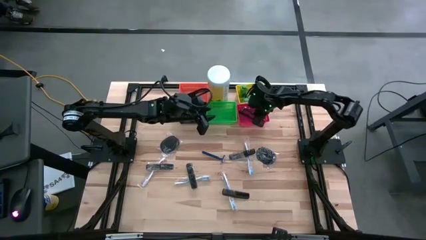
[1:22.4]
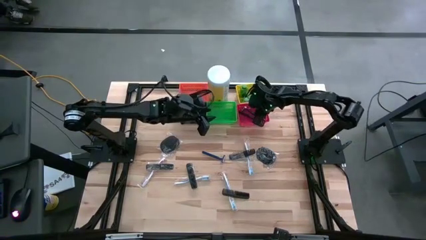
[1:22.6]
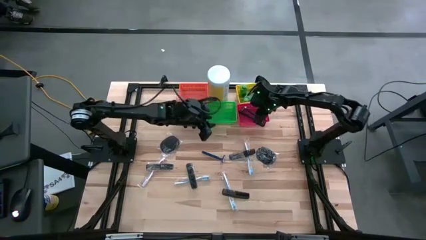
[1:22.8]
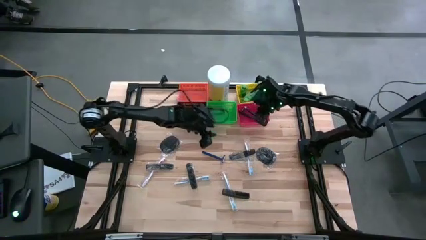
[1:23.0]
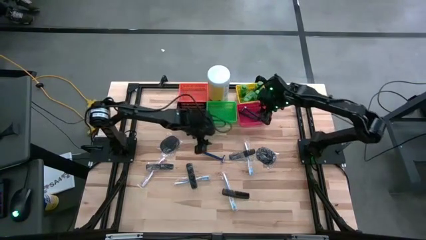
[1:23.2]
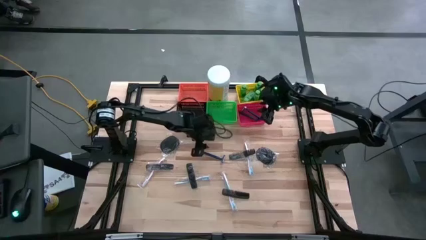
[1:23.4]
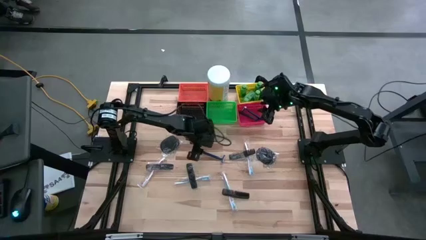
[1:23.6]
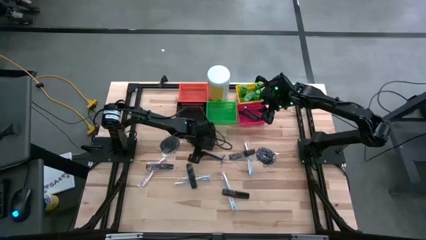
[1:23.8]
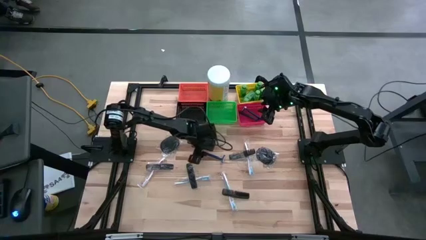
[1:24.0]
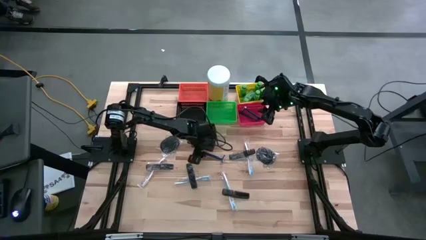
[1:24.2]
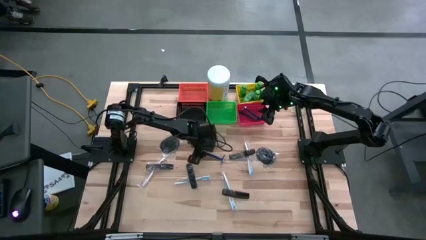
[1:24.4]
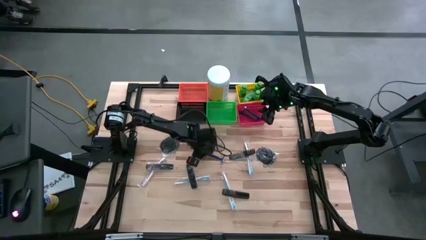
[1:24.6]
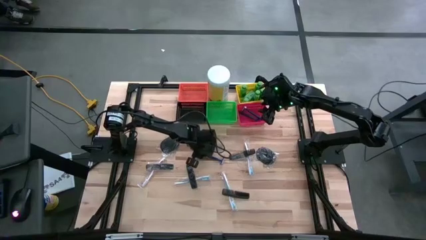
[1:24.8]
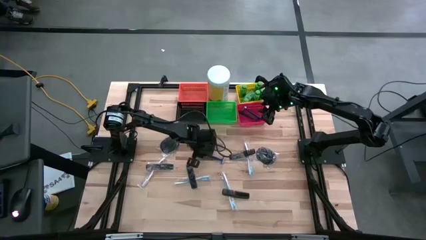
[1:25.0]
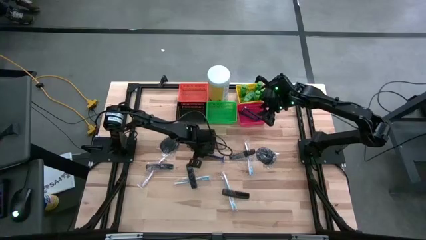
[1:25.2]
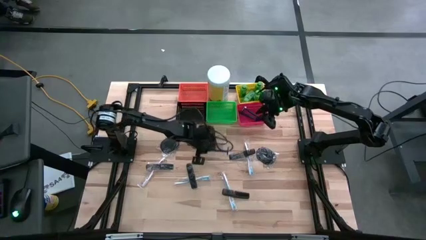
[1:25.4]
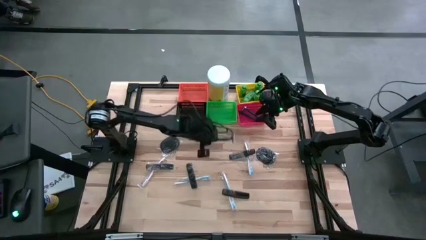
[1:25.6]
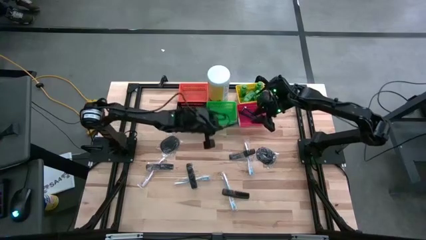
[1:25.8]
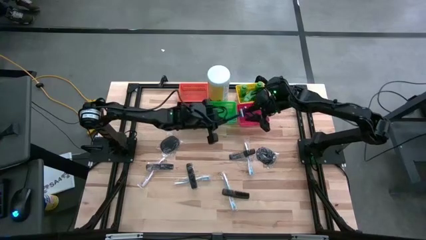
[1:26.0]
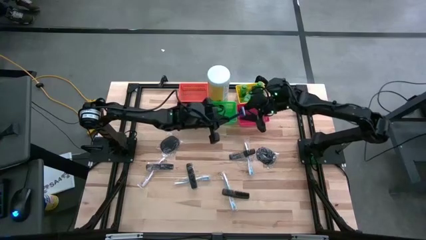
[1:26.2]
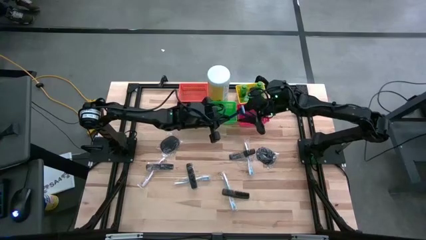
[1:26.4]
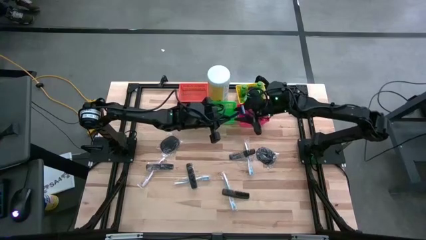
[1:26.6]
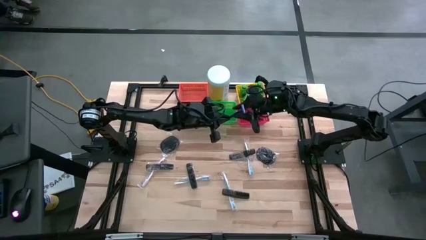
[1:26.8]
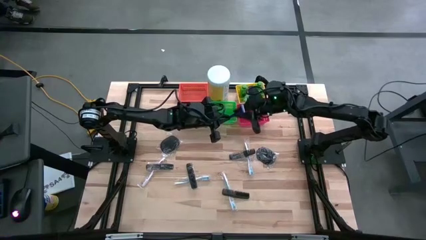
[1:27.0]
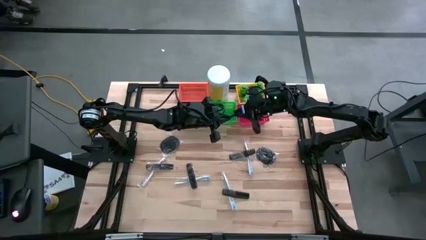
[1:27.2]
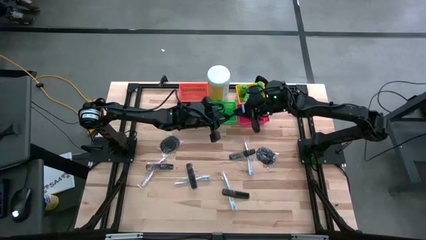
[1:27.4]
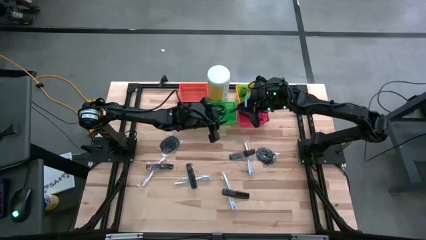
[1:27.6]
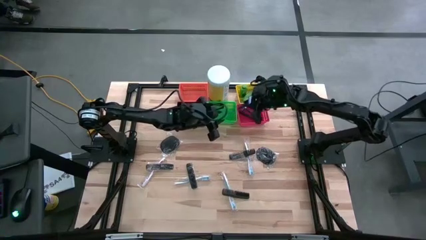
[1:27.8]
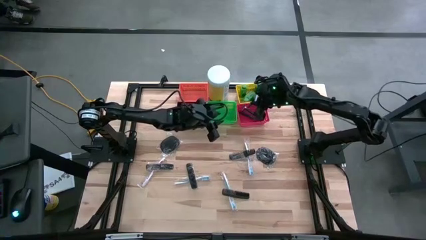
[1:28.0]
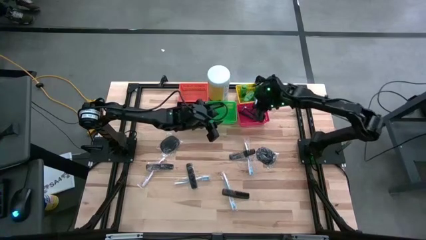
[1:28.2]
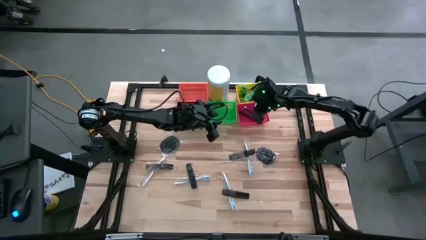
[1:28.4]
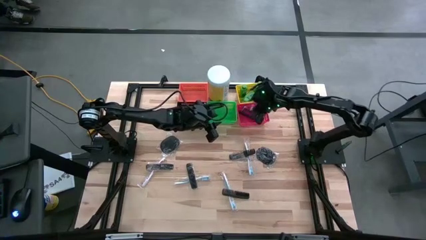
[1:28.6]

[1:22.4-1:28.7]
Task: Pick & Place Travel size toiletries
Put the blue razor into the red bin

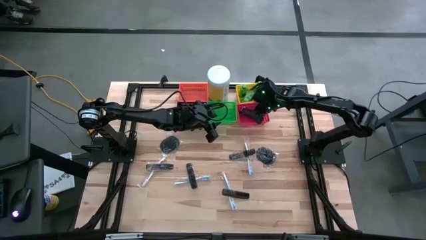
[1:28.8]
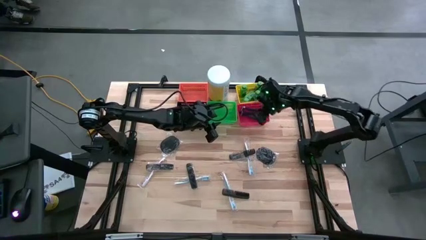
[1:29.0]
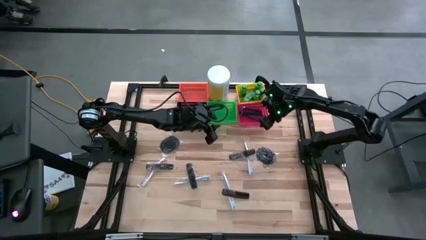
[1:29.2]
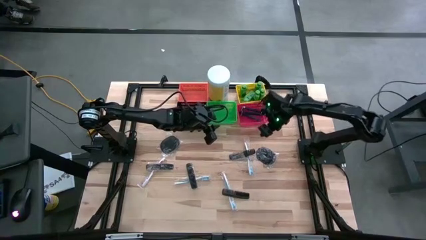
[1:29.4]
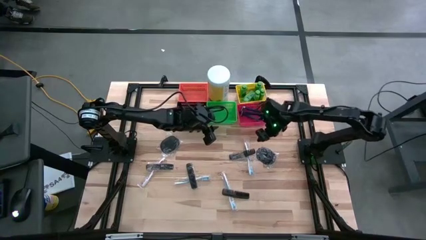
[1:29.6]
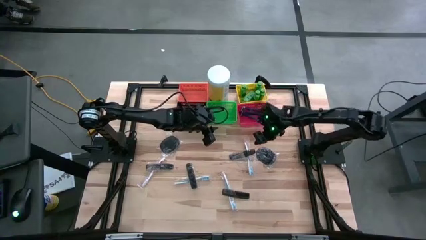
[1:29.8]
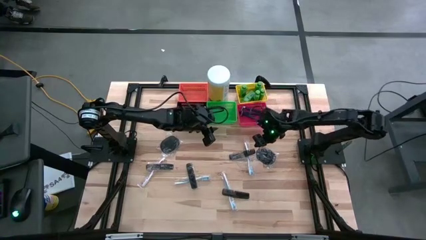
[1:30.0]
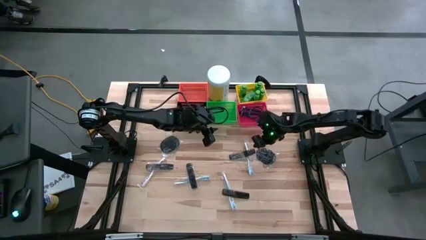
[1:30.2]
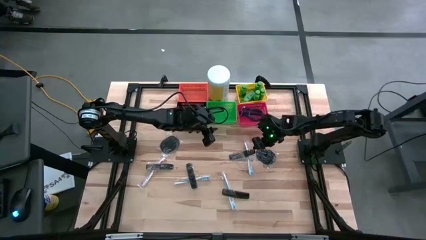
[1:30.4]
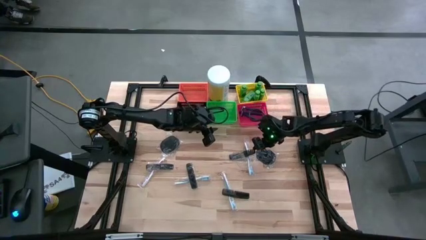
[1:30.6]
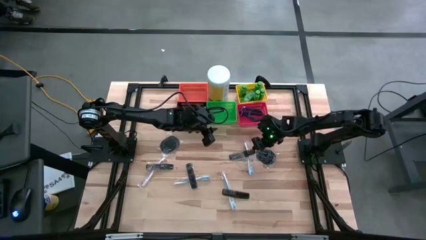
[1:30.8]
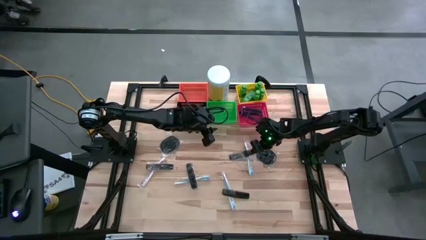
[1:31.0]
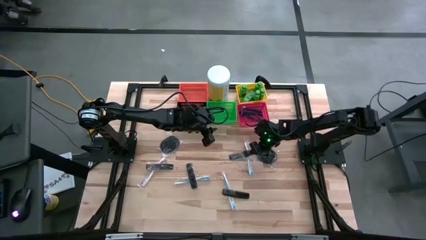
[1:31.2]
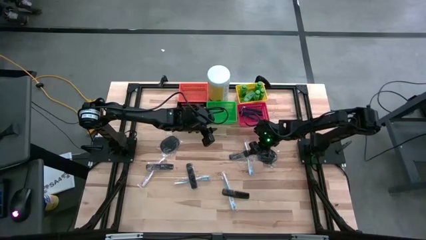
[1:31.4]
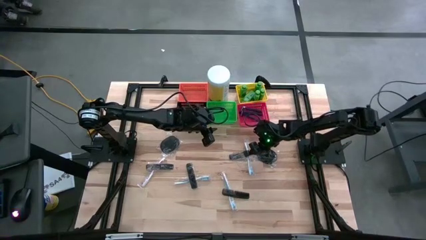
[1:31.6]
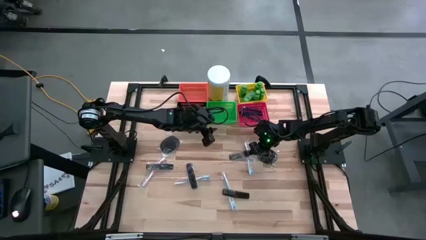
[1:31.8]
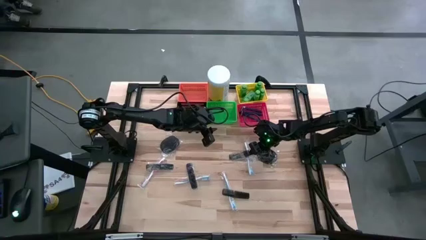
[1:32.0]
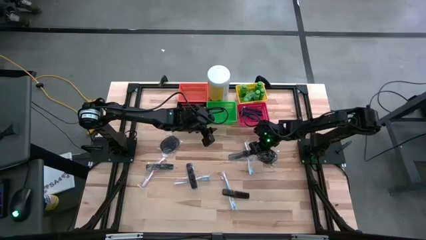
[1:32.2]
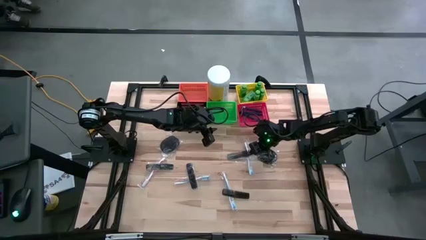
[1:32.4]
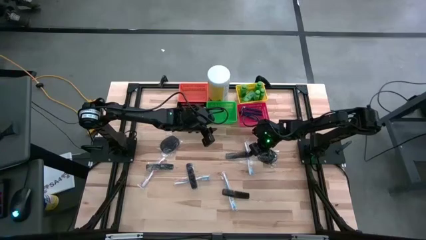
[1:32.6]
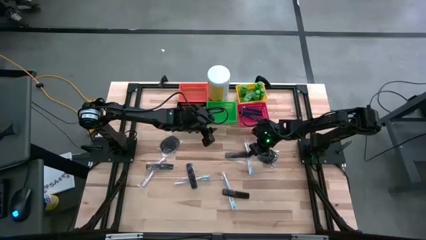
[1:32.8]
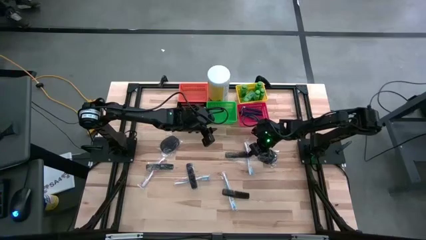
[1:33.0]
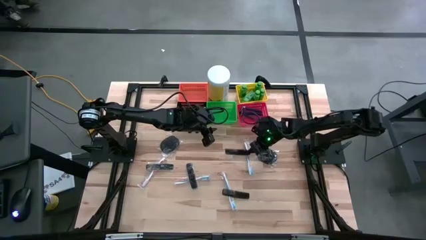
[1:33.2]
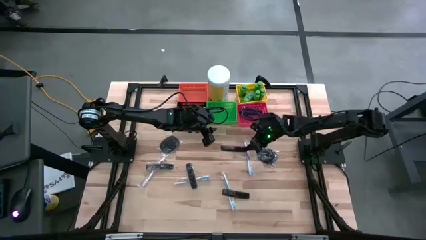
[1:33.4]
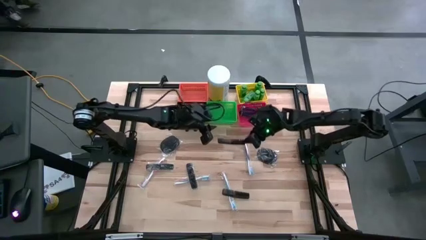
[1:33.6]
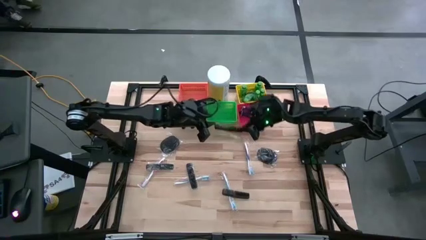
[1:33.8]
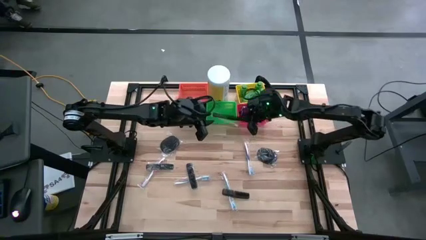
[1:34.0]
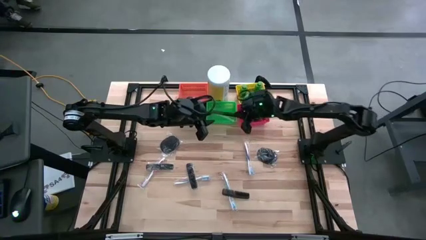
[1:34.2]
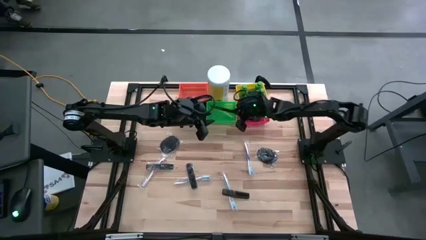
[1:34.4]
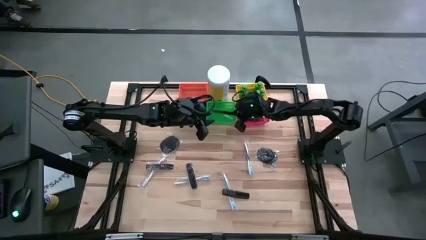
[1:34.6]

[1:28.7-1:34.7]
Put the black comb into the green bin

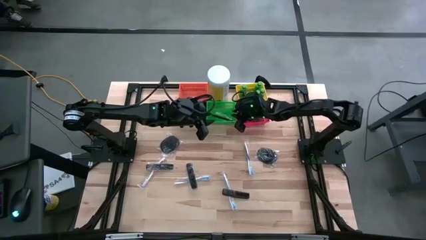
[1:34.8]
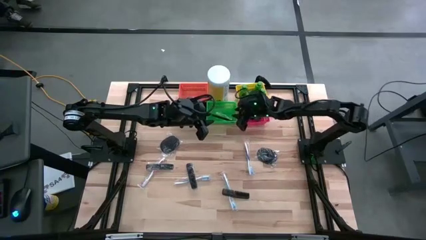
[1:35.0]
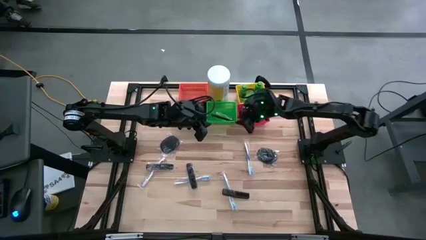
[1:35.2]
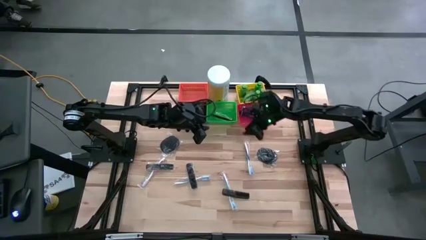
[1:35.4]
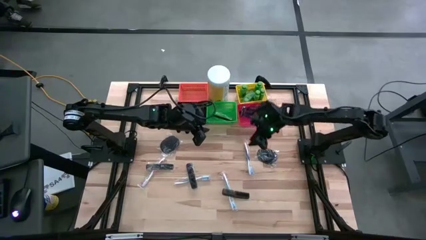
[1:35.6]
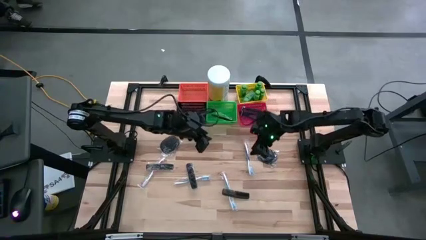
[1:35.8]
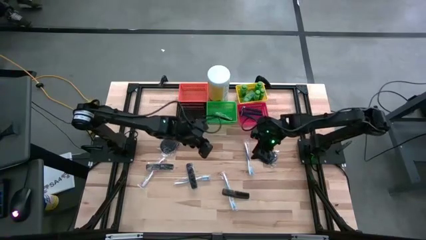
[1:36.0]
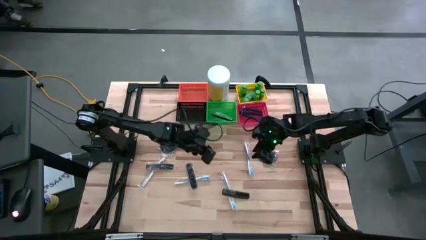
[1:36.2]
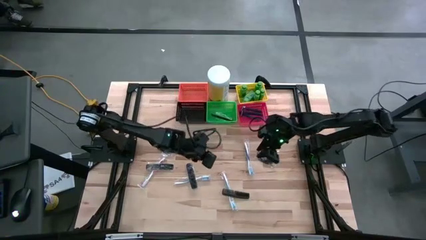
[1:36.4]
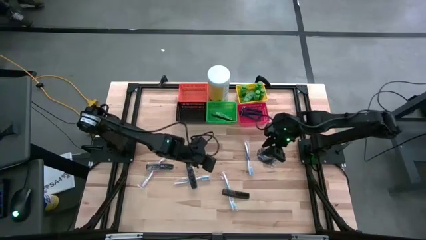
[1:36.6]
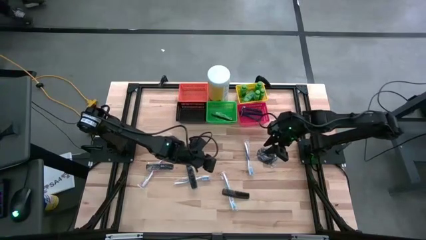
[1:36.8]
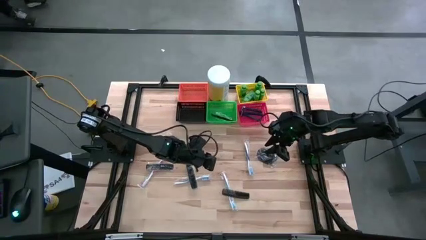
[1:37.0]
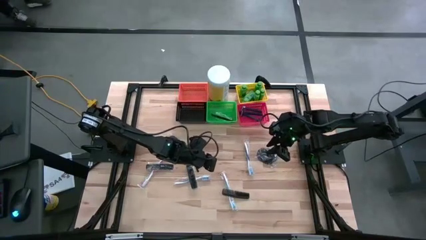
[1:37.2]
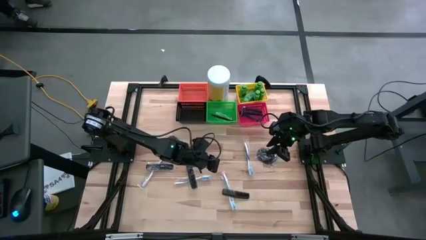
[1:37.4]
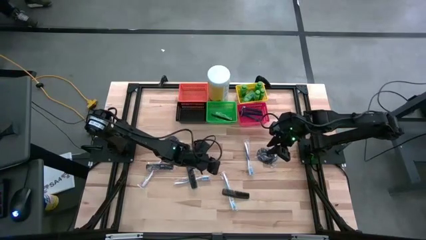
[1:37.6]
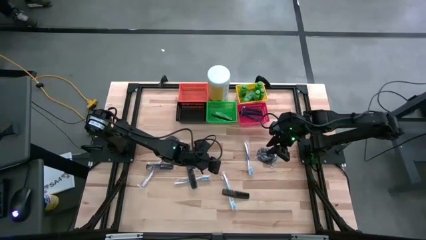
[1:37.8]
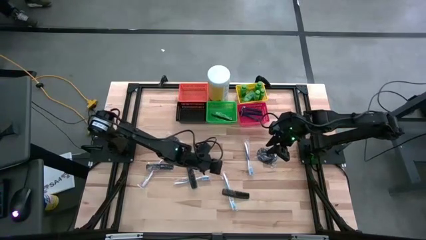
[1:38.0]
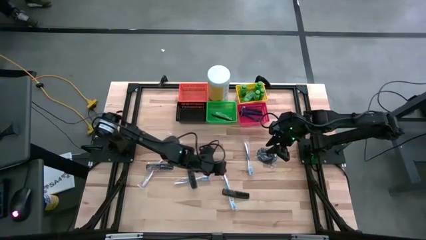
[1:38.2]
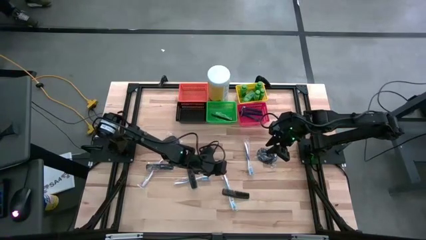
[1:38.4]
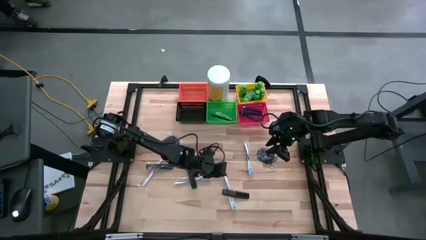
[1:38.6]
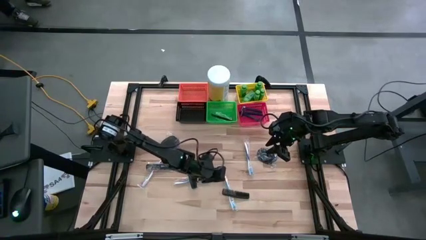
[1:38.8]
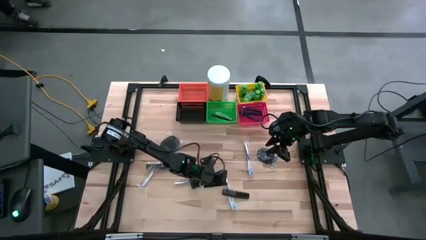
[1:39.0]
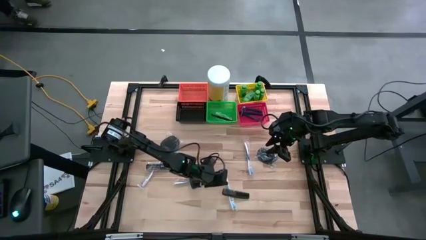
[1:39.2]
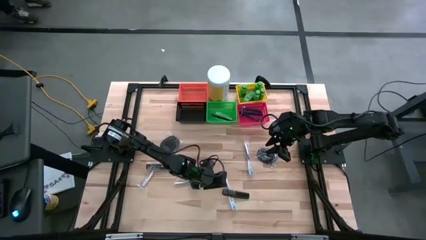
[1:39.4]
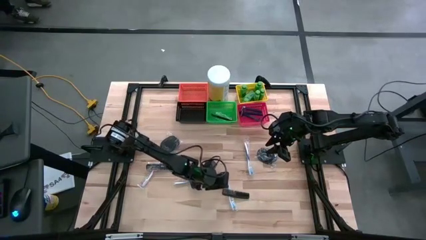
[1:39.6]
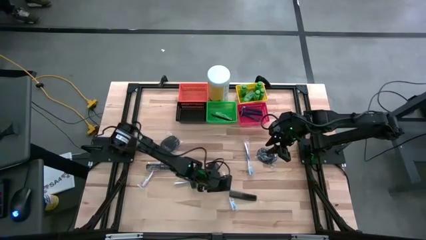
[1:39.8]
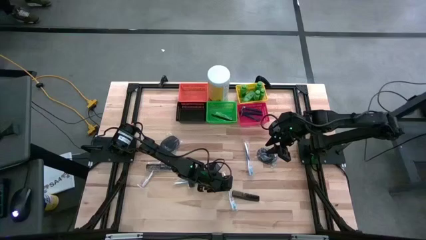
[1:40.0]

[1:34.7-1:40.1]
Put the black comb into the green bin
